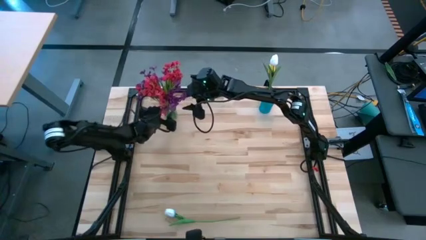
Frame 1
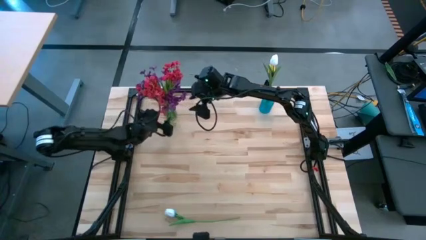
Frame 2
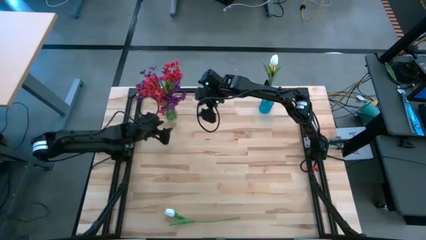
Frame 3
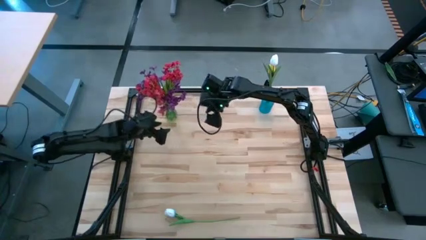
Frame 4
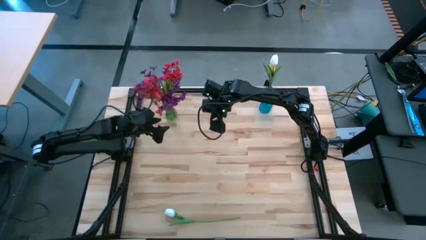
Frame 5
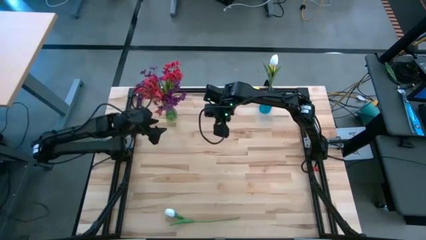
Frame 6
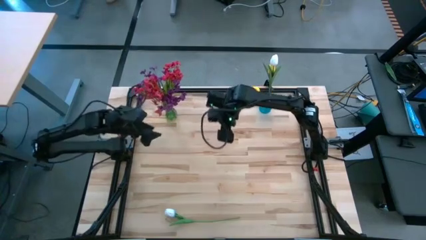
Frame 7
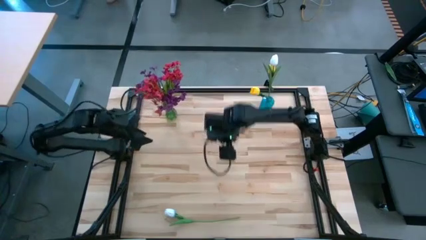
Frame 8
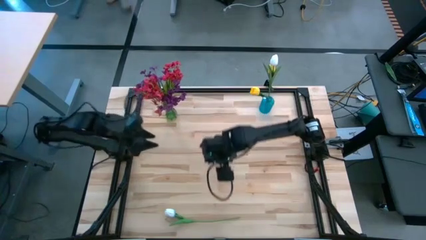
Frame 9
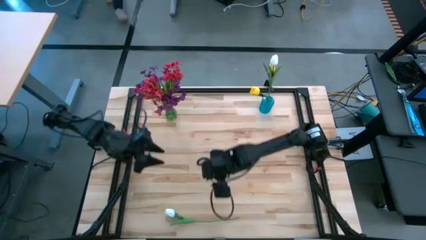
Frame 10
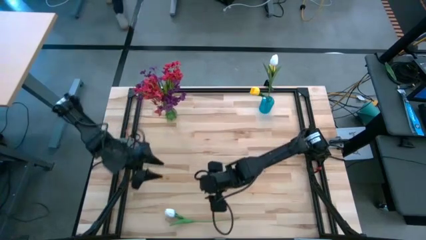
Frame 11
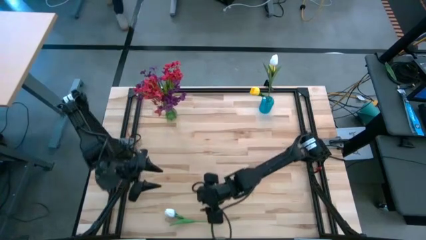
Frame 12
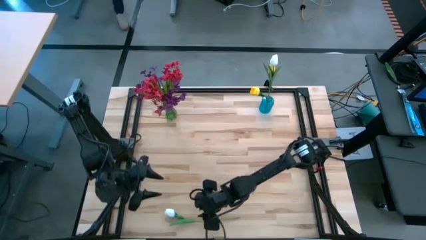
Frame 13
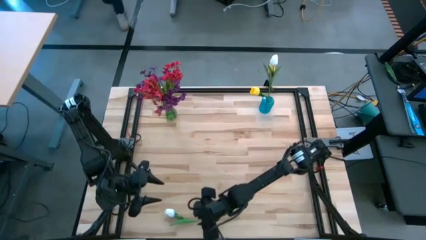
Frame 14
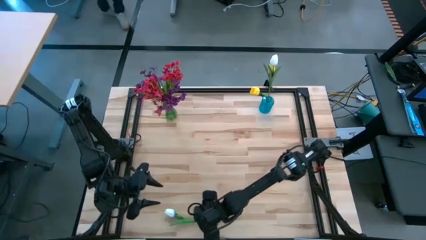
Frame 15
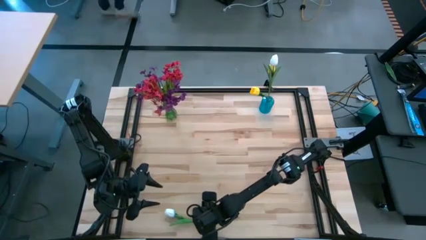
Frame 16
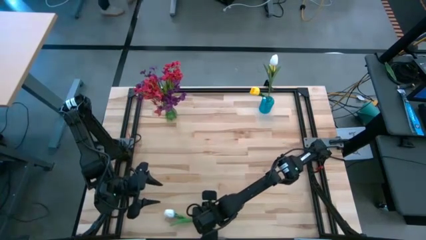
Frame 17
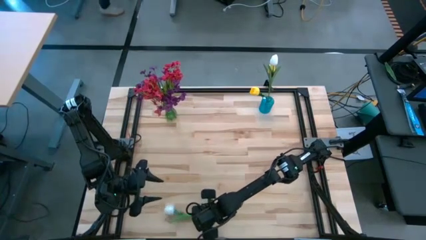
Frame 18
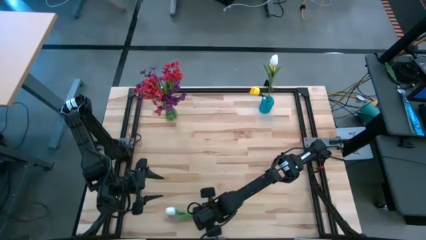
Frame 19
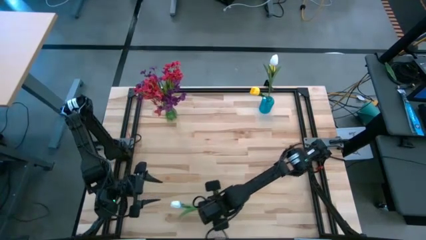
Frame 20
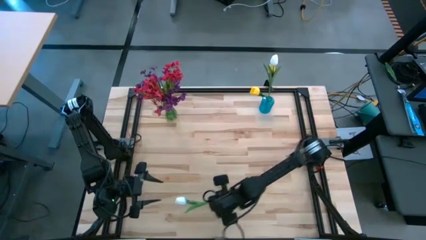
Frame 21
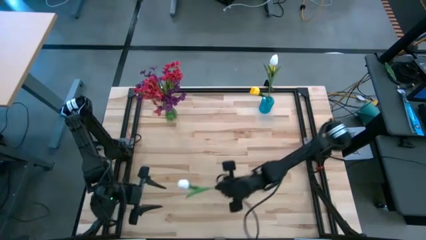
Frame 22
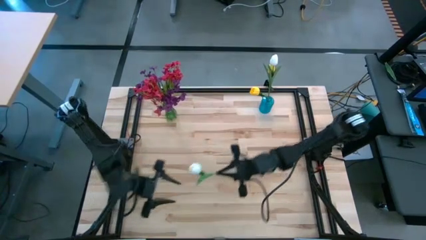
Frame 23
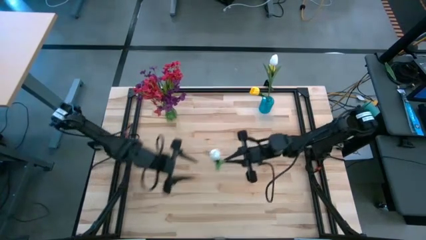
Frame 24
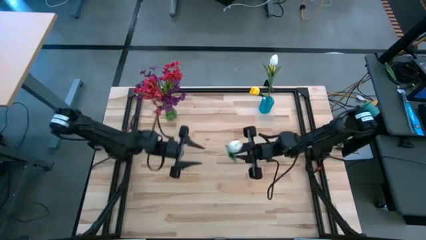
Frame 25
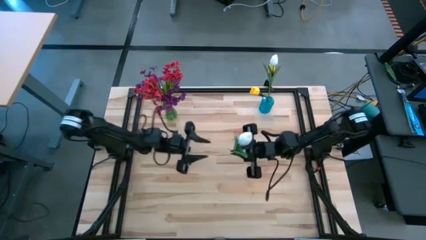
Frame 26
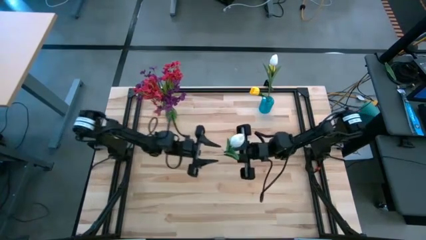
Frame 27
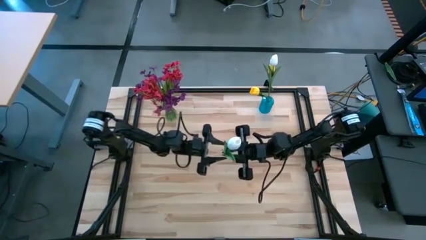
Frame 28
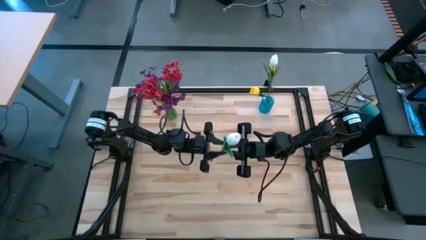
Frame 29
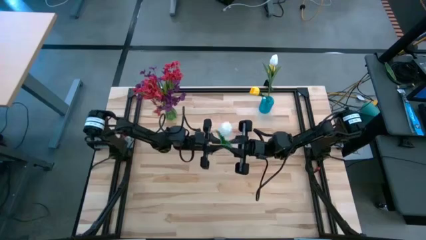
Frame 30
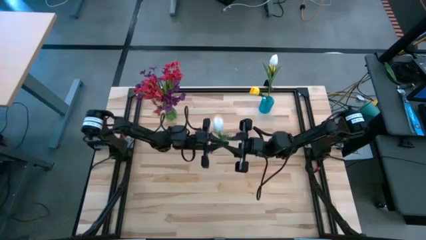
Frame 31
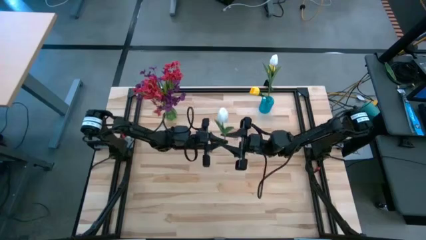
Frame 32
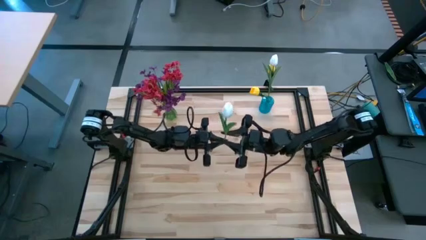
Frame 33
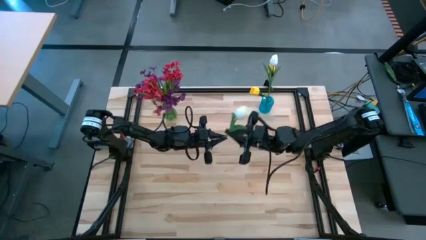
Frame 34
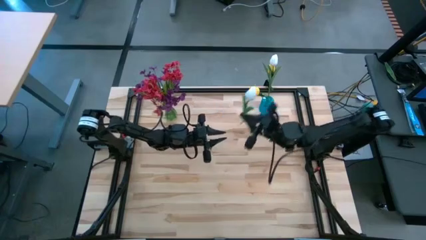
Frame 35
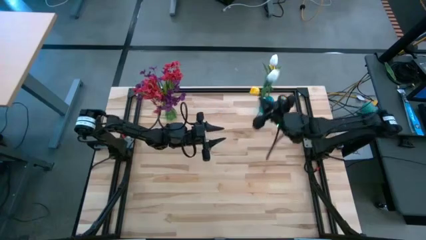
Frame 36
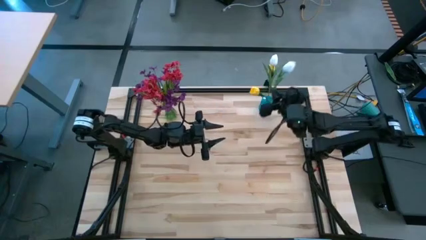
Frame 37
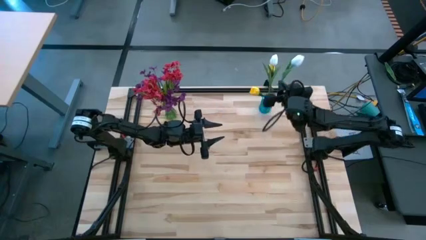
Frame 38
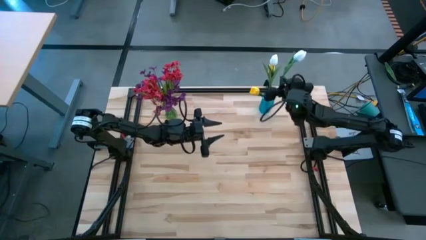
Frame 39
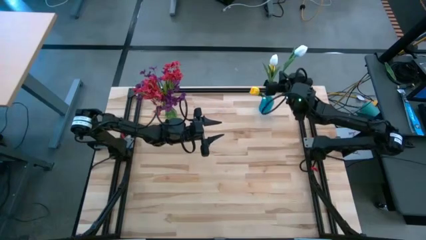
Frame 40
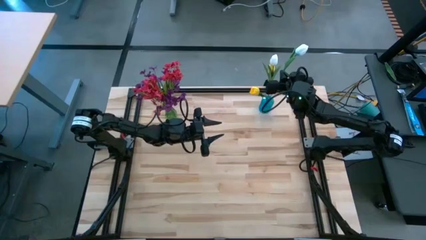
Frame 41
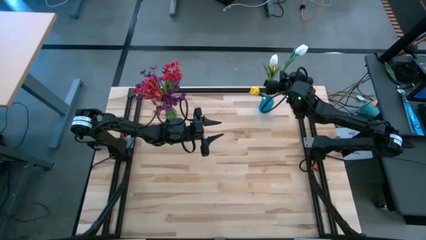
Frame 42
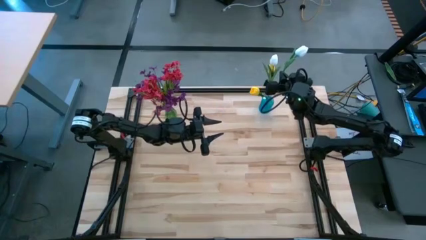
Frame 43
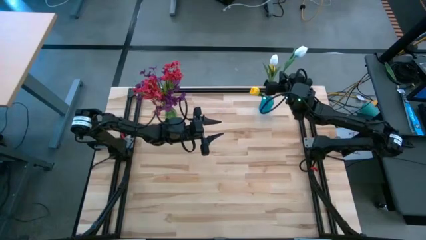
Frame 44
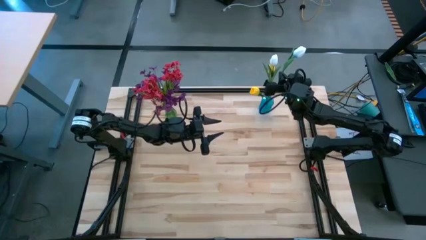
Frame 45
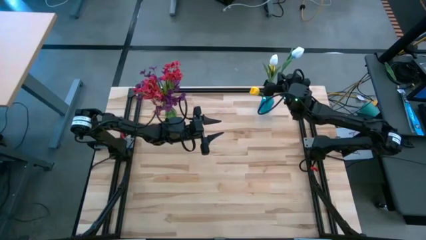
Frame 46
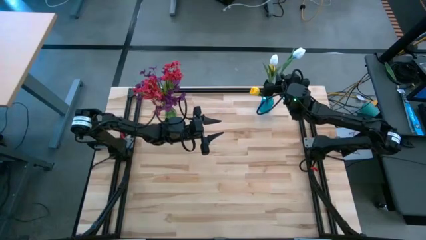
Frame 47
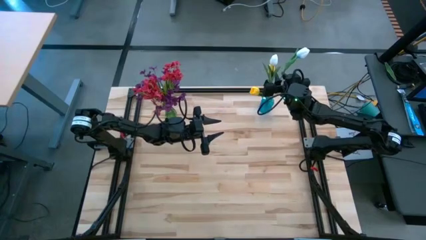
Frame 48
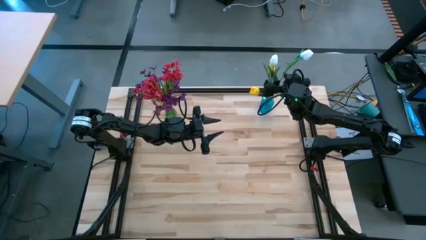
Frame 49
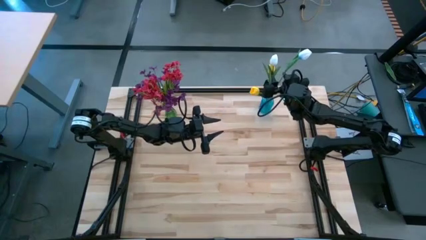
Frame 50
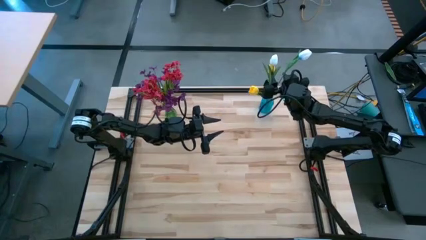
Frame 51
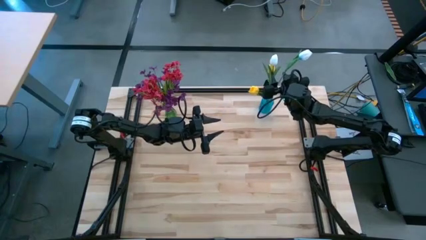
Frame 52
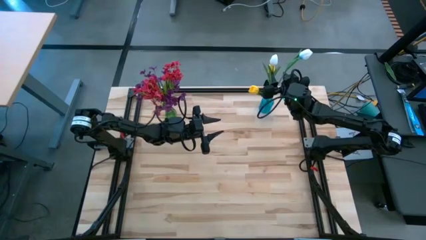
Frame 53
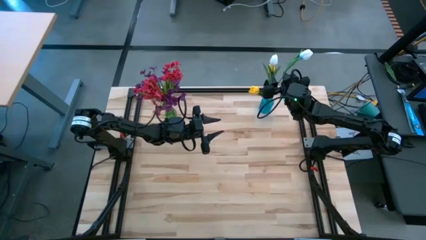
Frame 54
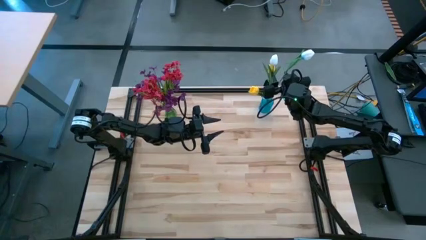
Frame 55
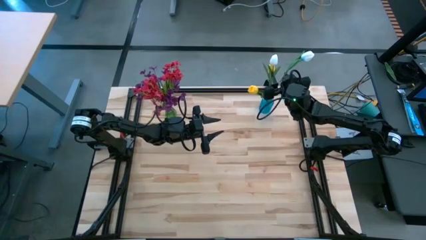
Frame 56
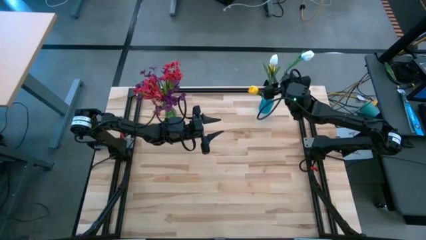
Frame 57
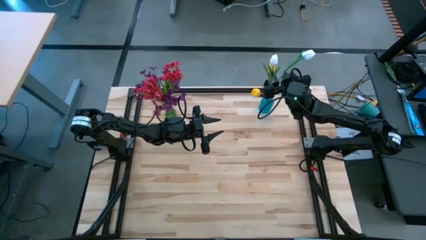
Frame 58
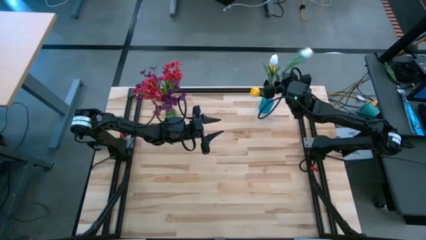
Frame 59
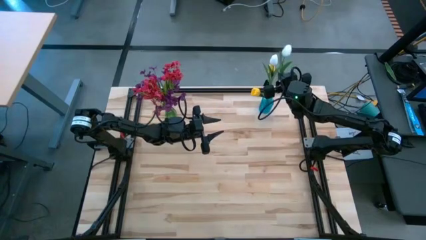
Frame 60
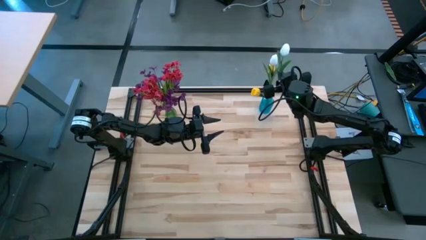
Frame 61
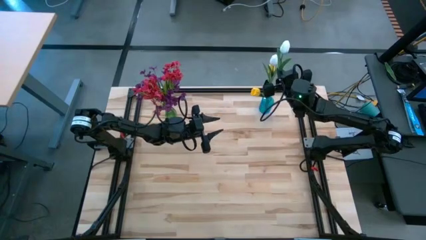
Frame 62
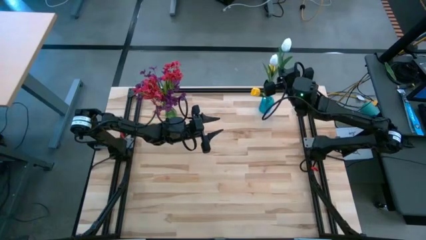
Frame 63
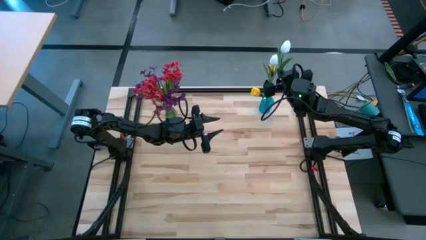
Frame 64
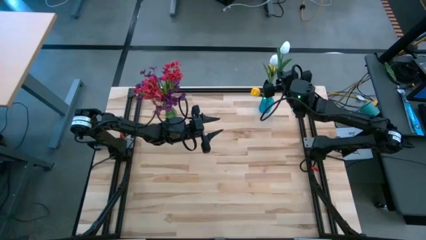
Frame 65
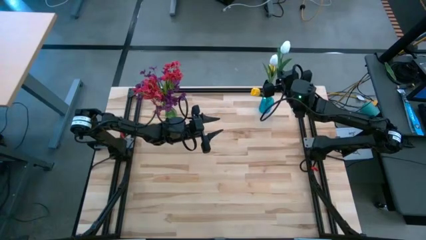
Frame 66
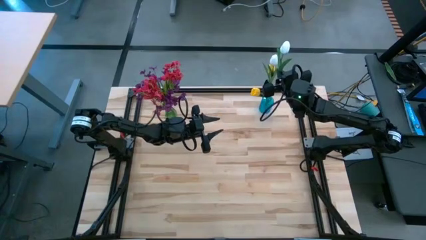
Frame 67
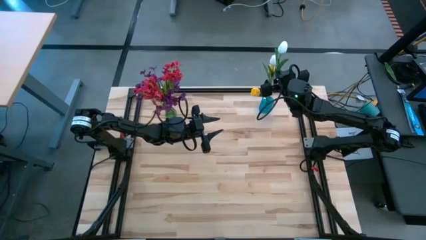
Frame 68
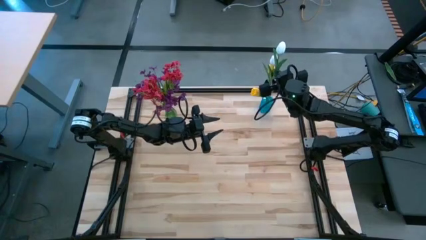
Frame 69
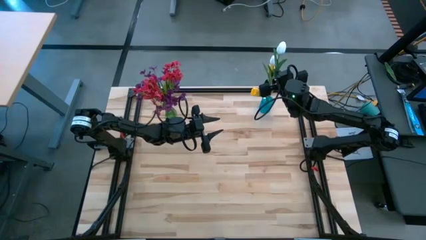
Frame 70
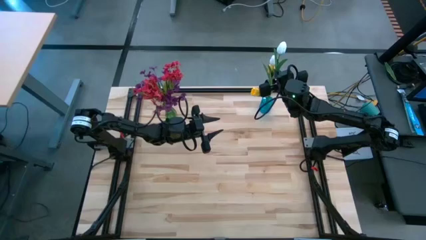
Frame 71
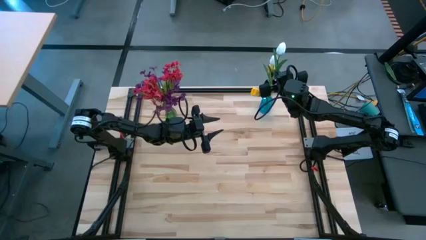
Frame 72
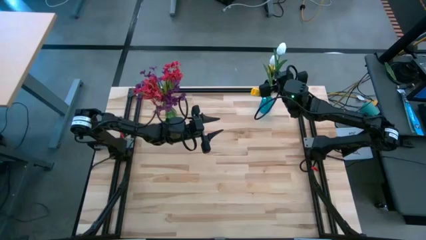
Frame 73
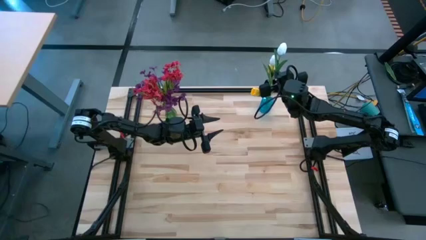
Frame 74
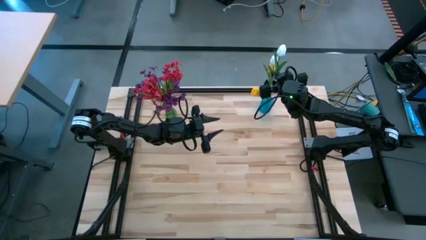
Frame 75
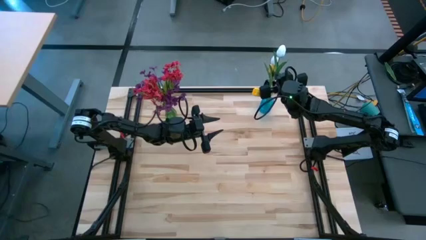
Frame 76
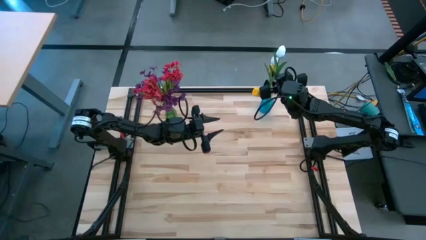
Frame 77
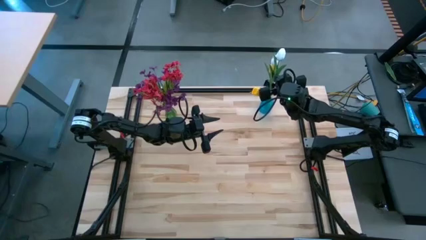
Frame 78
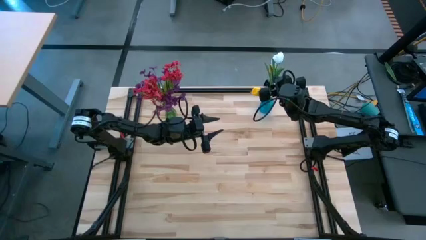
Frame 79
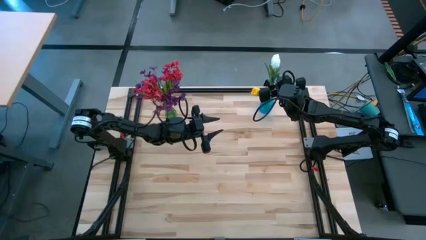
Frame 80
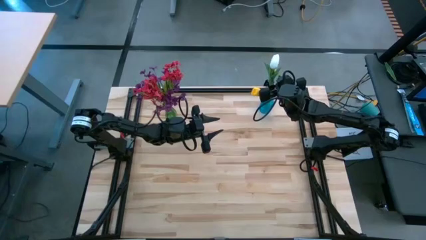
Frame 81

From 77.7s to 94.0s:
Task: Sort flowers into vase by color
Put the white tulip into the blue vase
